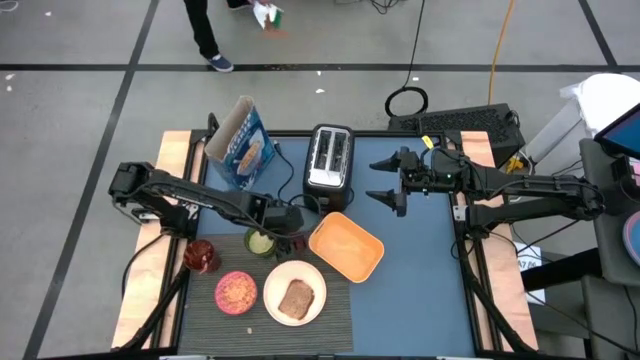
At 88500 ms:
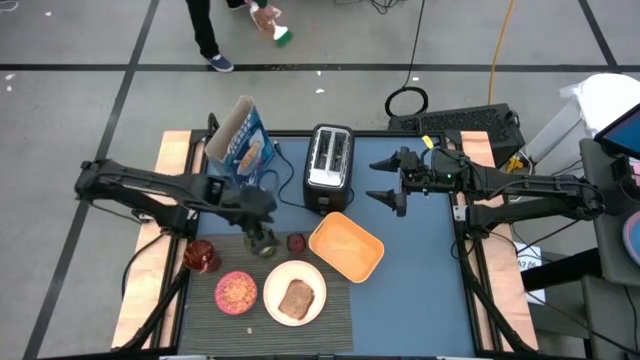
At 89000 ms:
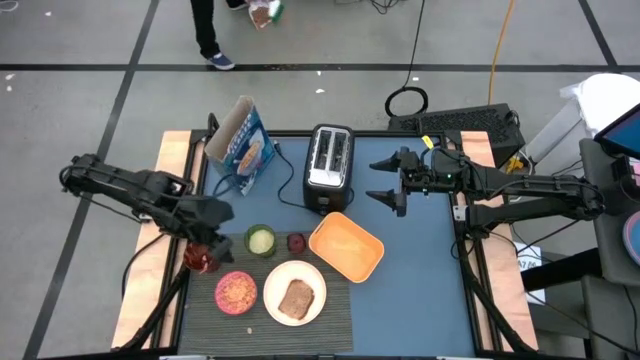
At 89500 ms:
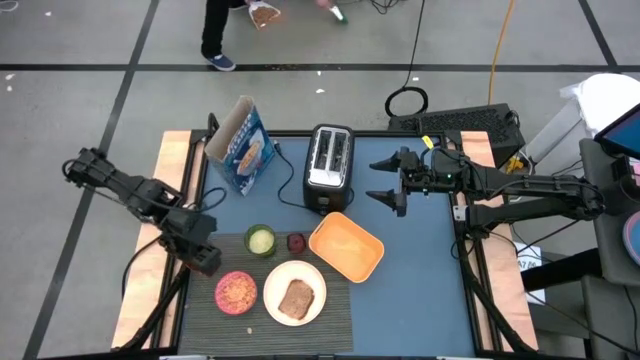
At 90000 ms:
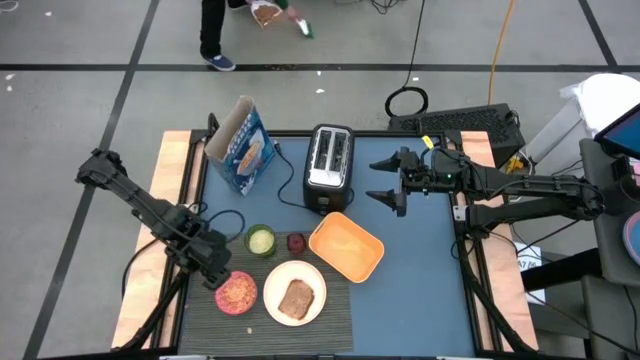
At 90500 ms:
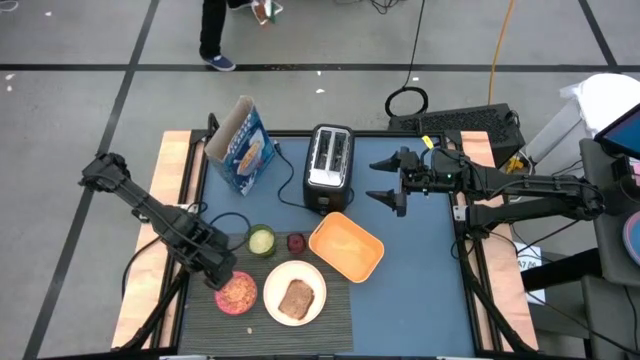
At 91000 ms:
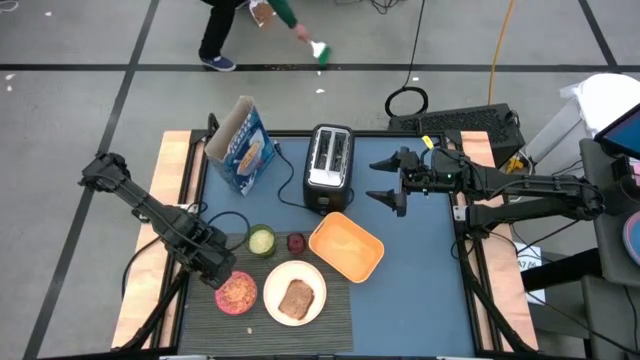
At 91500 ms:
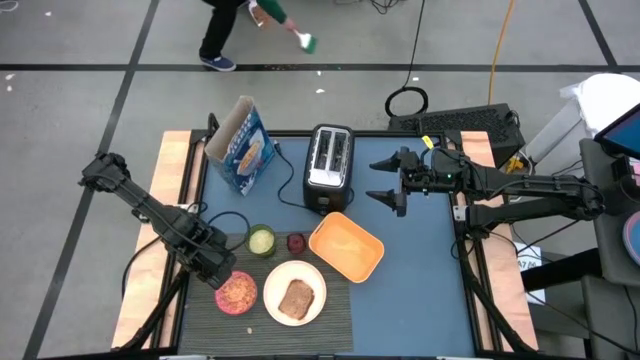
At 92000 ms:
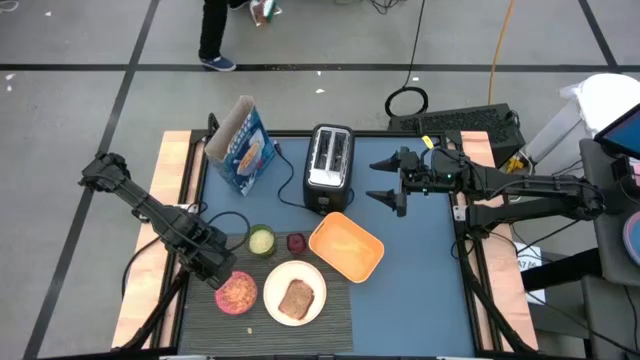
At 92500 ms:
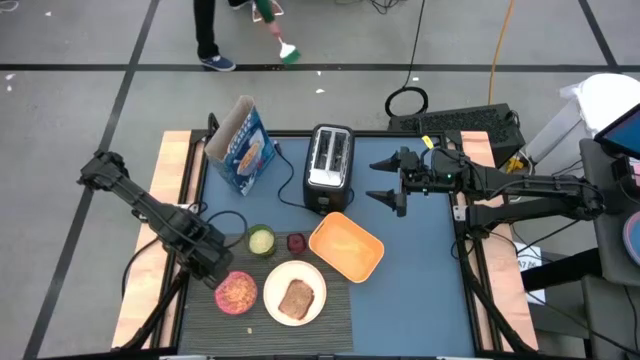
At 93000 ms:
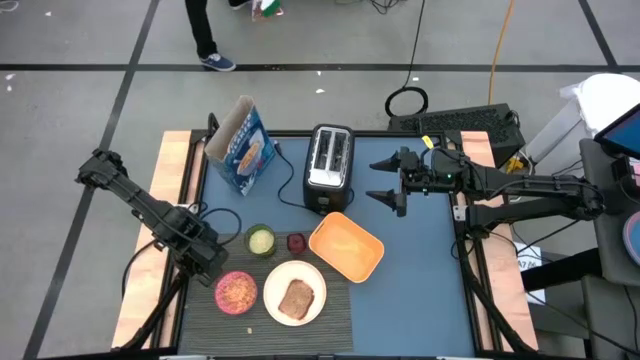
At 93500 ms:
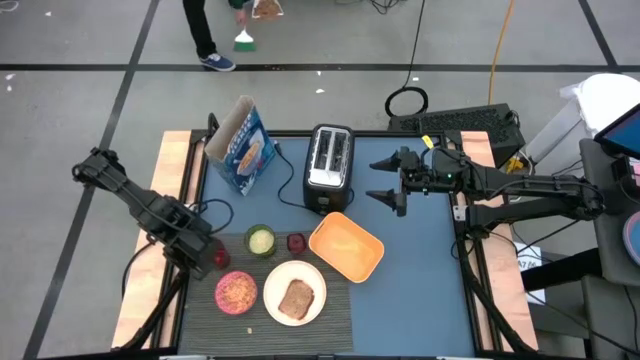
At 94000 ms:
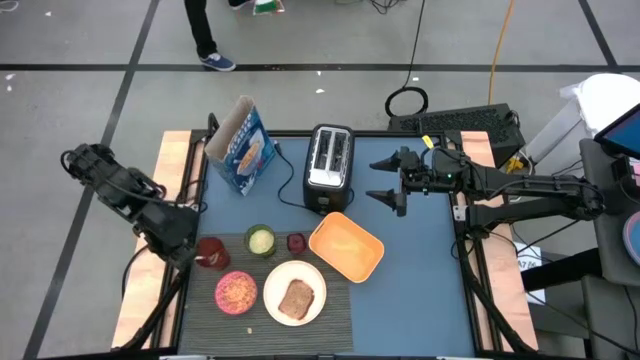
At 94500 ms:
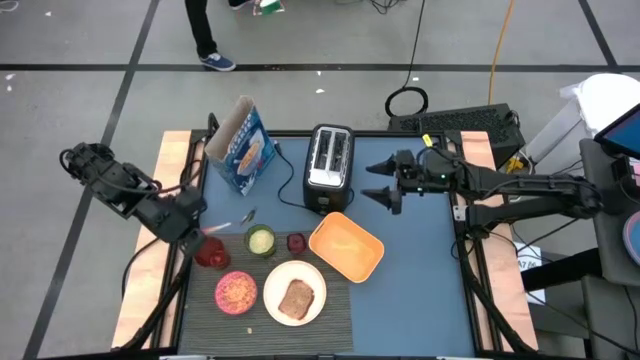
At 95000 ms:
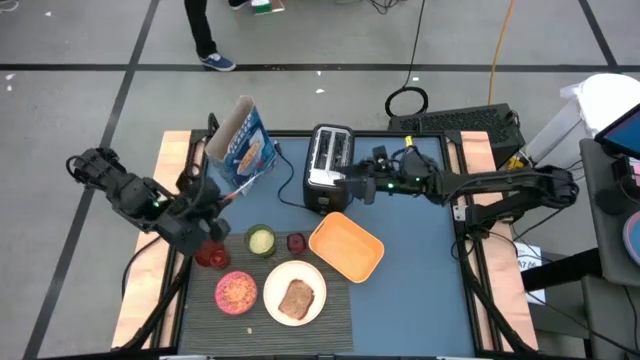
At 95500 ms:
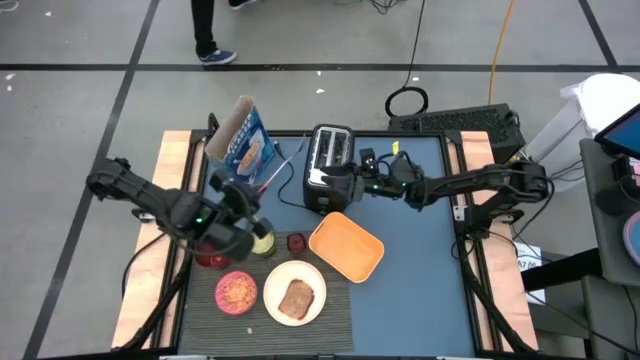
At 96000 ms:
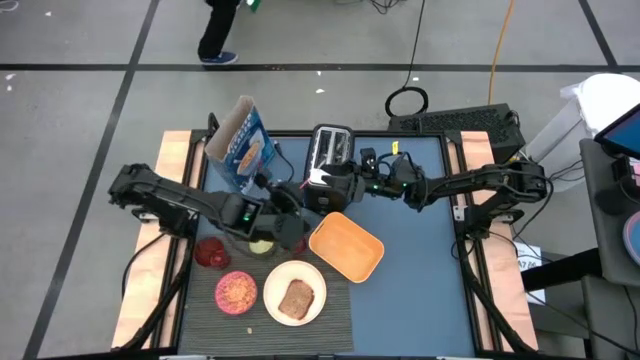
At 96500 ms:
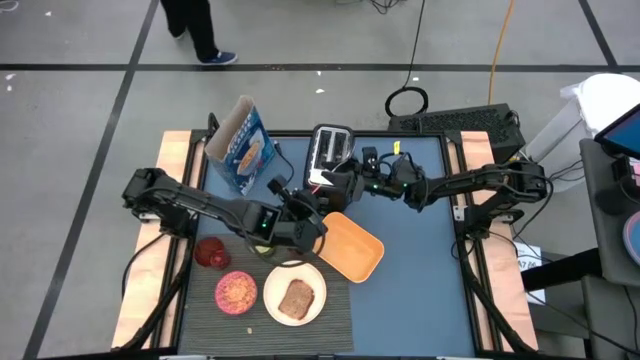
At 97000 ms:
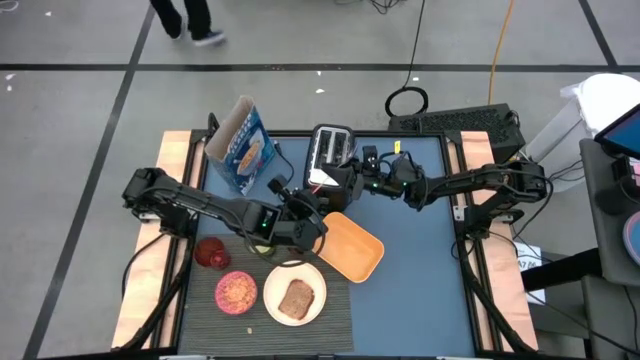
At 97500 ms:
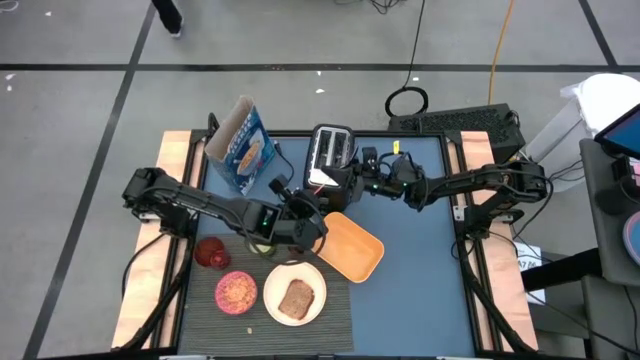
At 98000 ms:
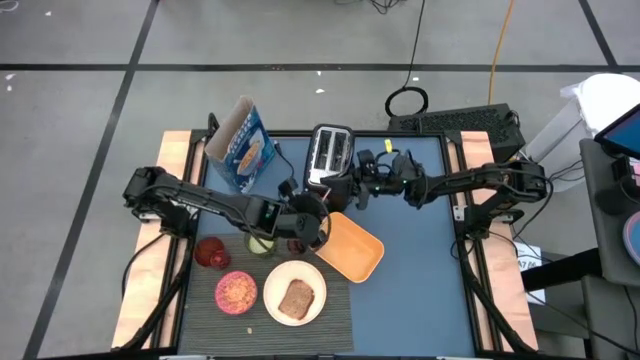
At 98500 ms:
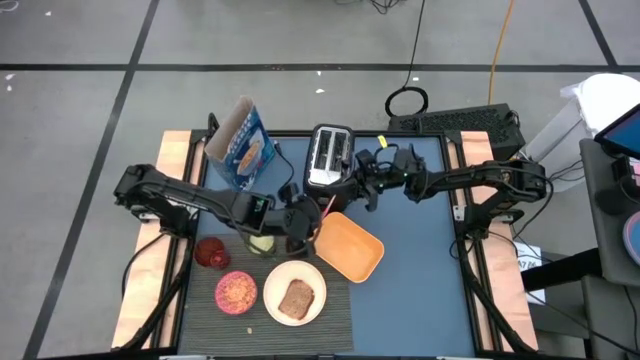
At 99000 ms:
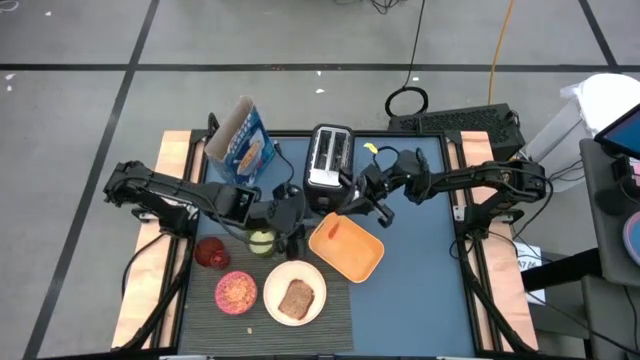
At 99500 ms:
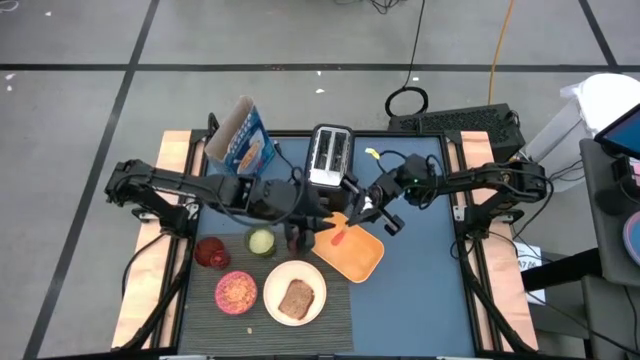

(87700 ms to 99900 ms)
Task: Arrange a breakfast setting
Put the orange spoon on the gray table mat to the left of the red bowl

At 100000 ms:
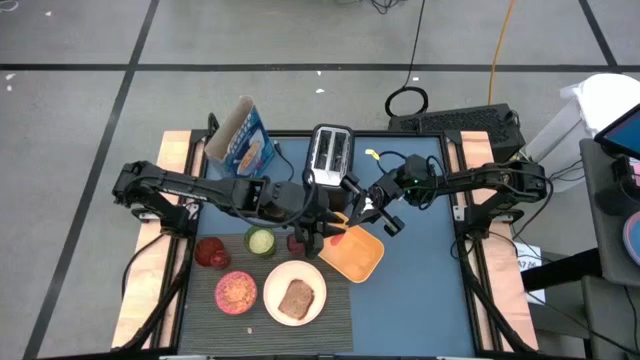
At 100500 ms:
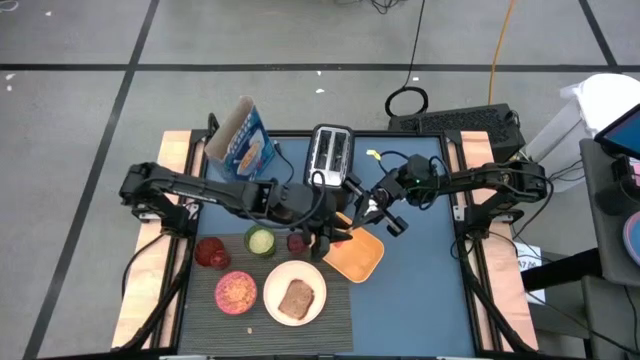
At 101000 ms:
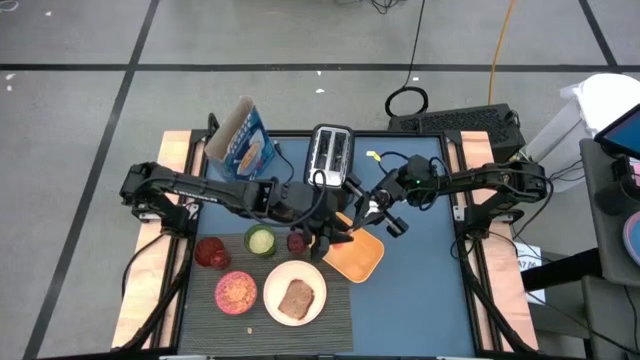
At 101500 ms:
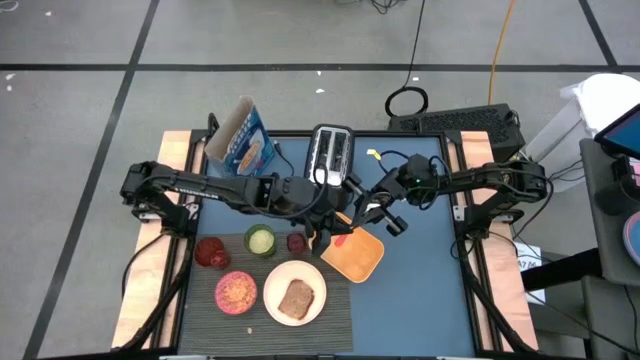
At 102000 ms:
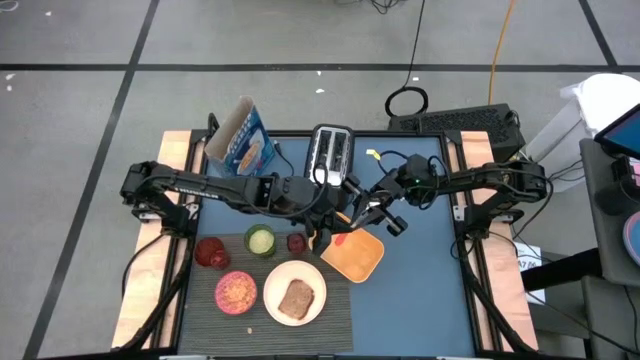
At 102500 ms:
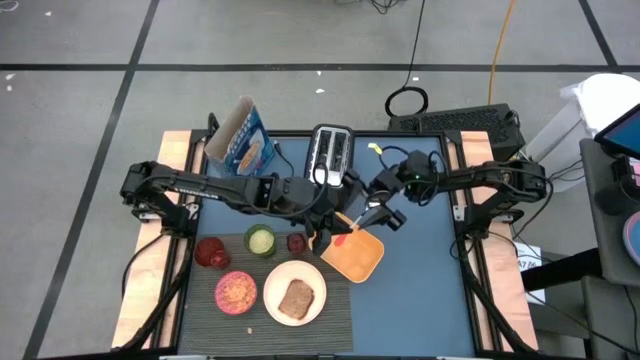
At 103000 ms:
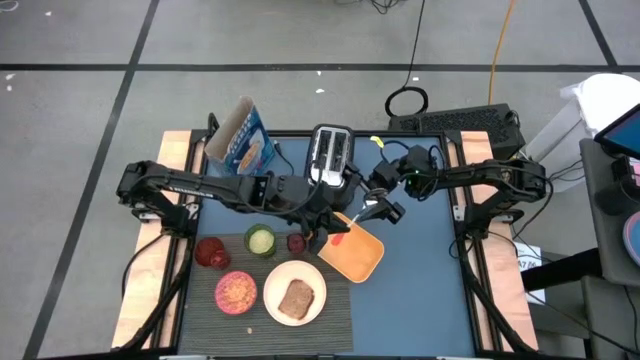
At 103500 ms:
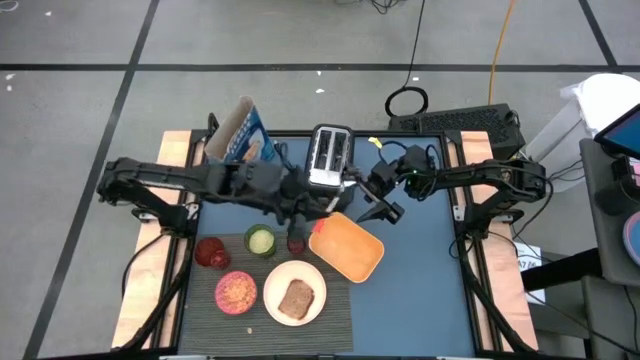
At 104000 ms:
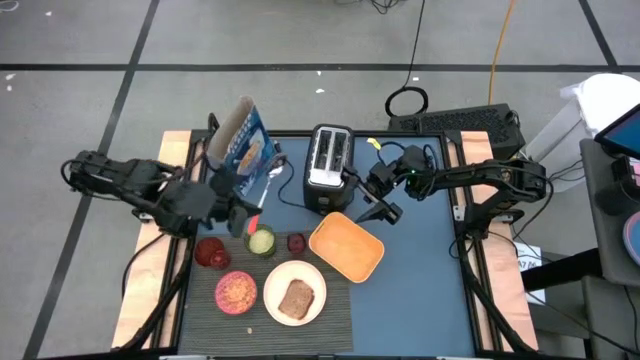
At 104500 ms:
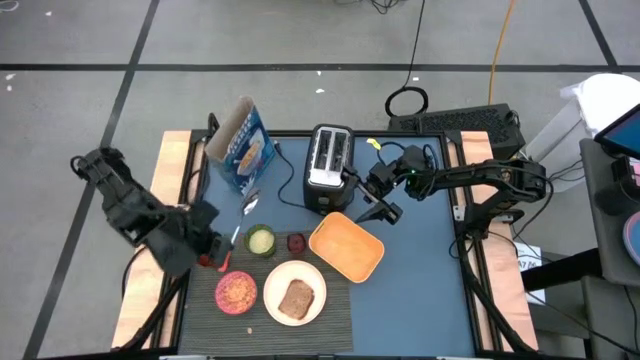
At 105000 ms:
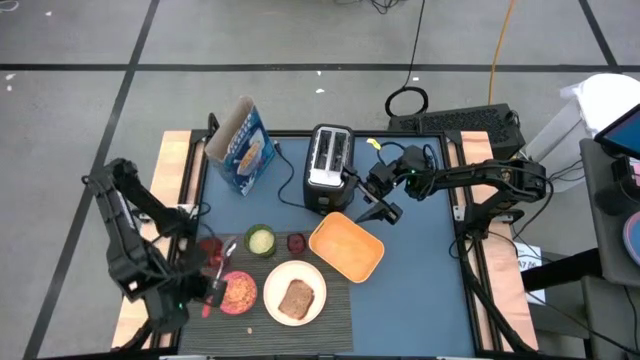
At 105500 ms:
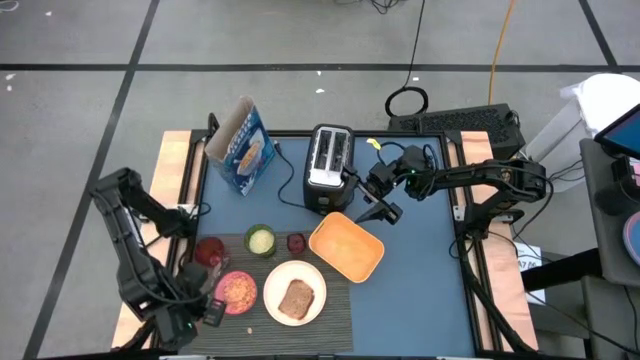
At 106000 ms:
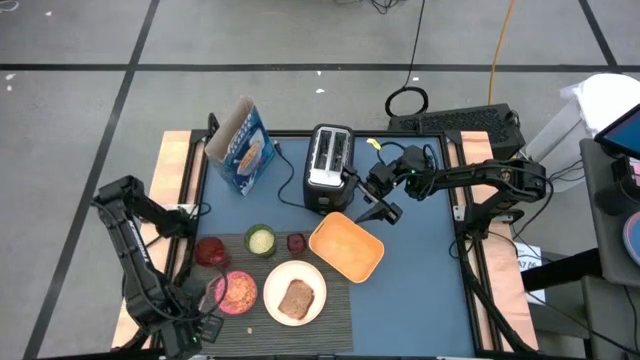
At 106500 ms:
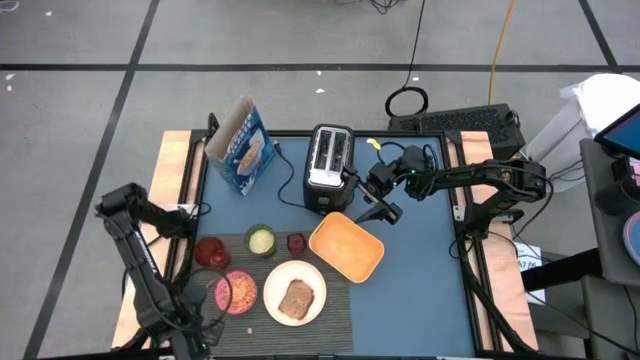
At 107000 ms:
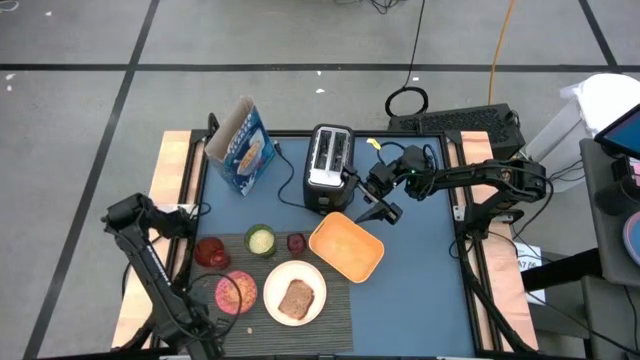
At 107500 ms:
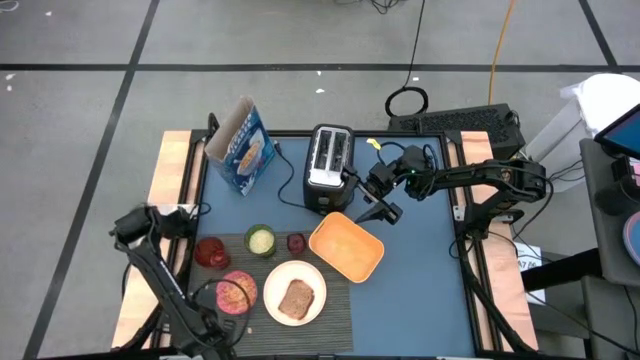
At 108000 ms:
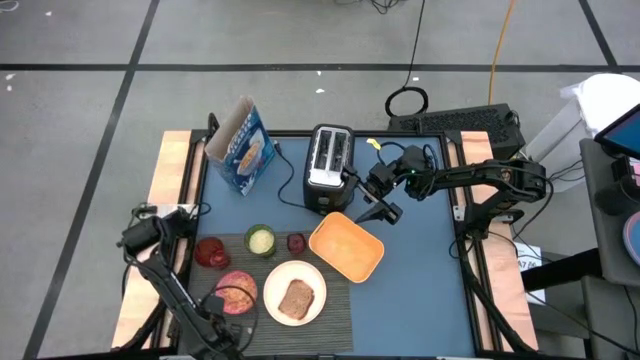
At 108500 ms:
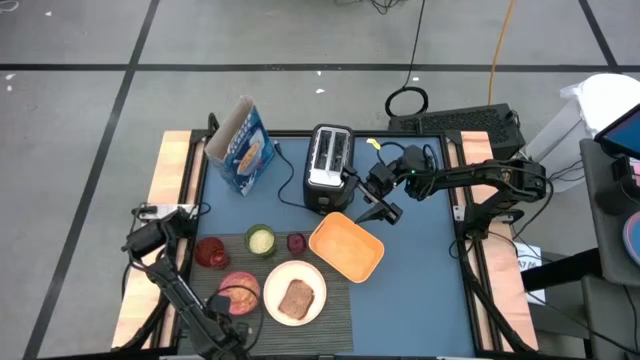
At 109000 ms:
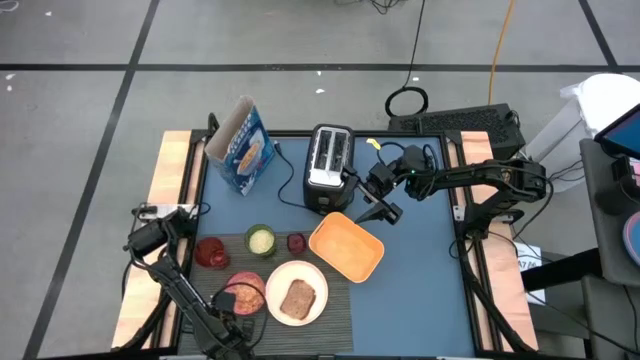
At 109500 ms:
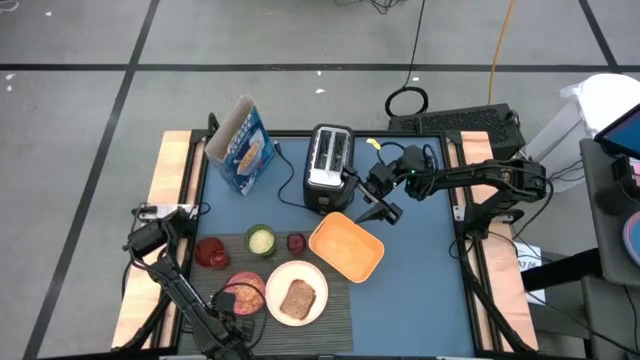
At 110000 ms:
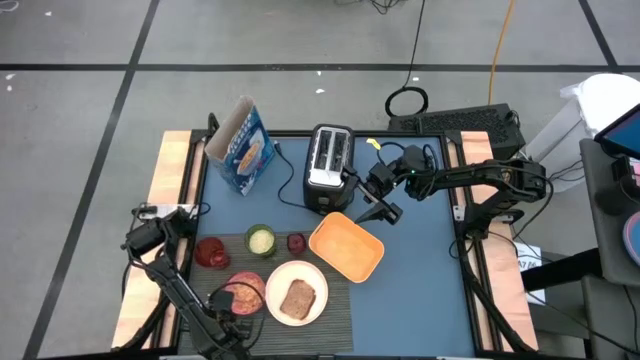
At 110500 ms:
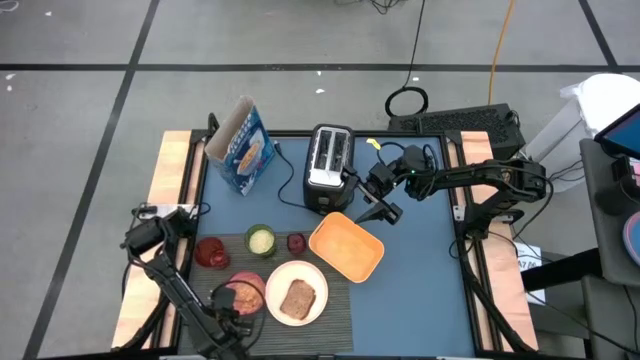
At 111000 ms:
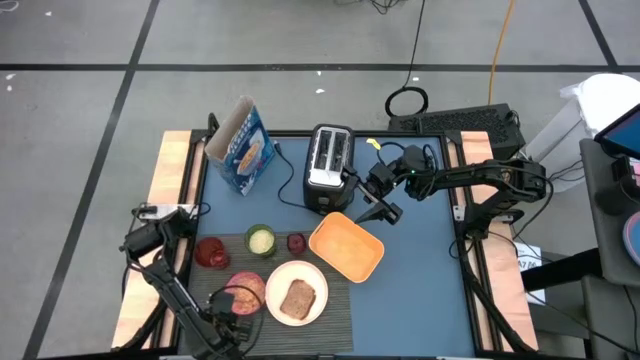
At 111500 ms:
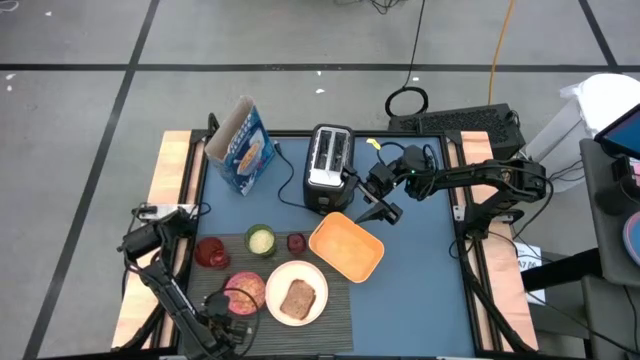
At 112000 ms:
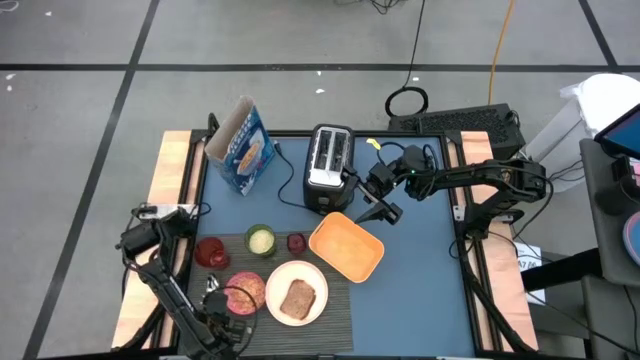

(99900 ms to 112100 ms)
Put the orange spoon on the gray table mat to the left of the red bowl
